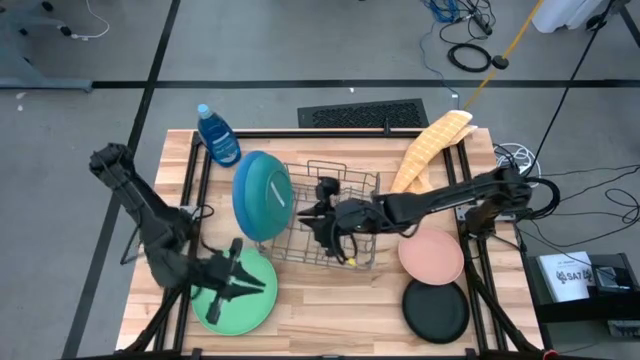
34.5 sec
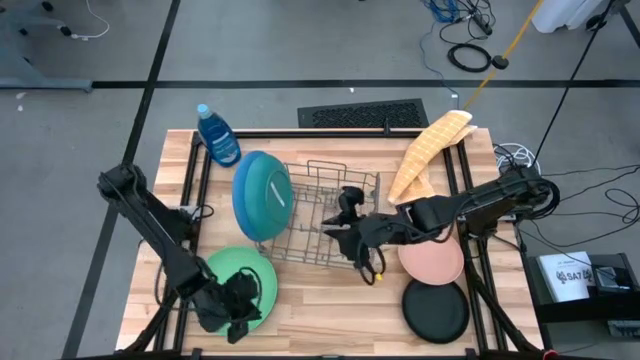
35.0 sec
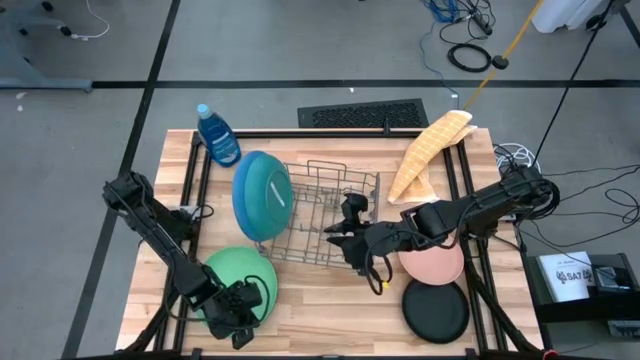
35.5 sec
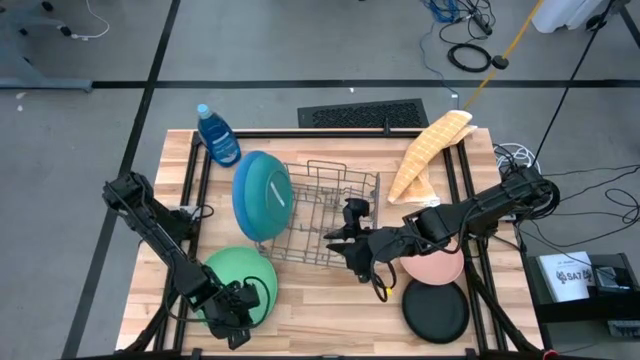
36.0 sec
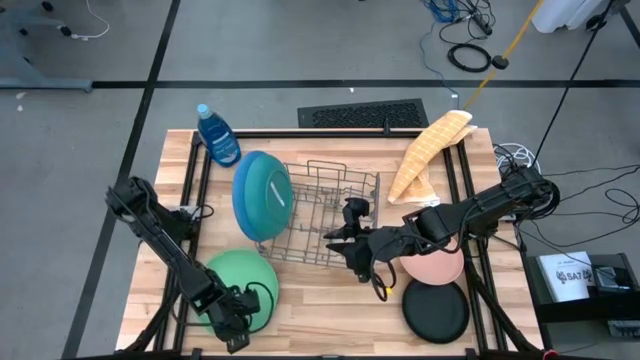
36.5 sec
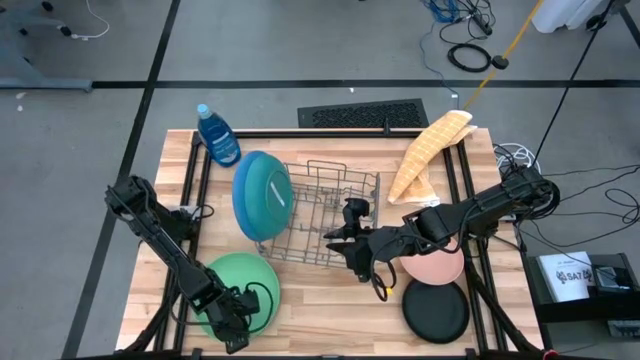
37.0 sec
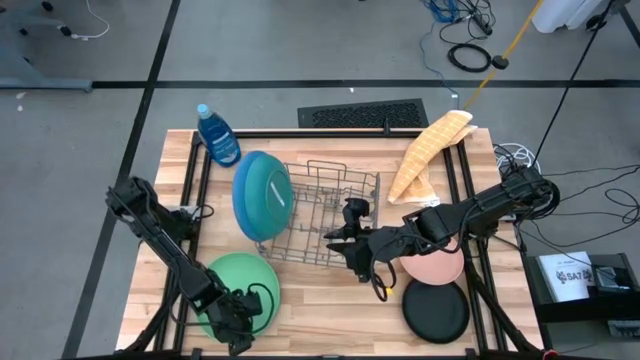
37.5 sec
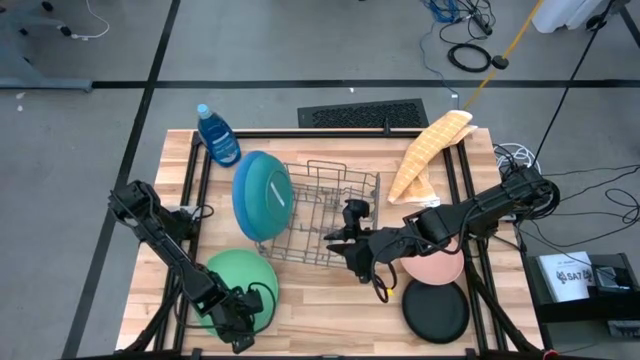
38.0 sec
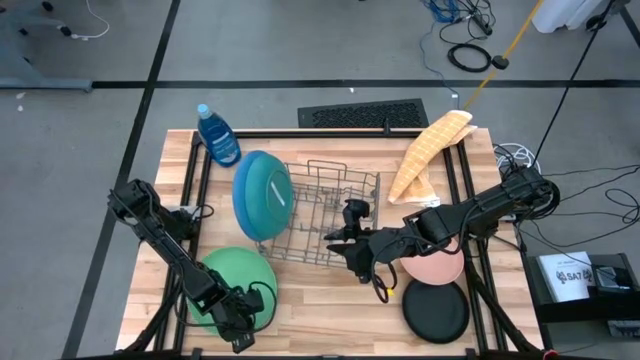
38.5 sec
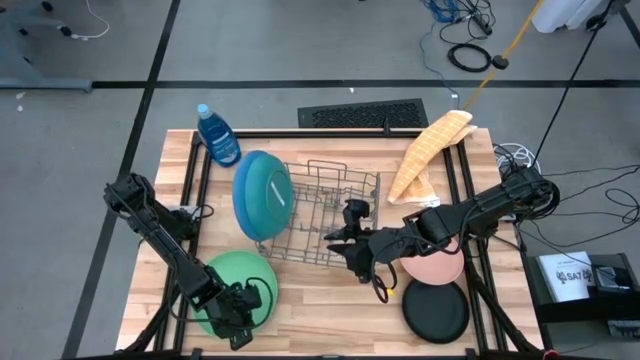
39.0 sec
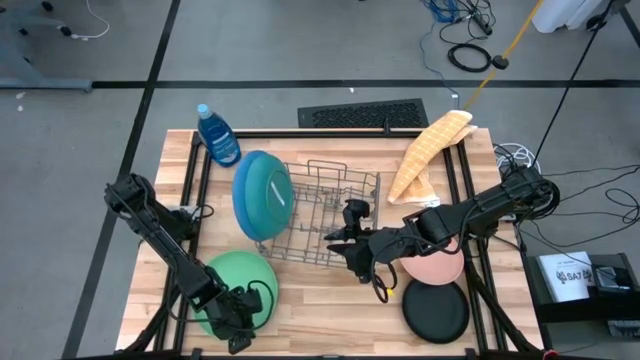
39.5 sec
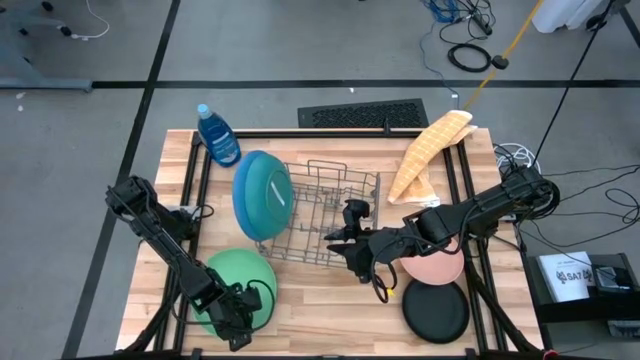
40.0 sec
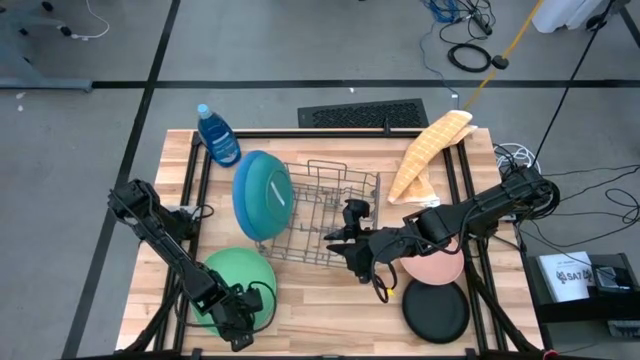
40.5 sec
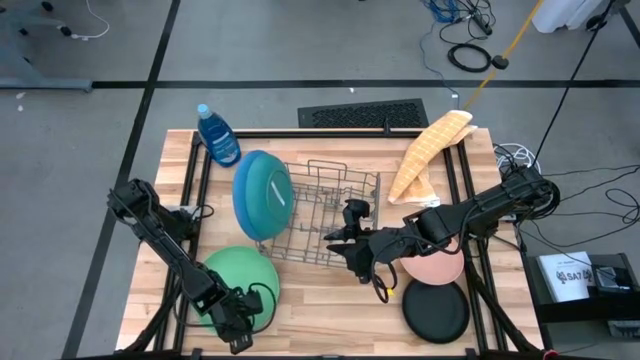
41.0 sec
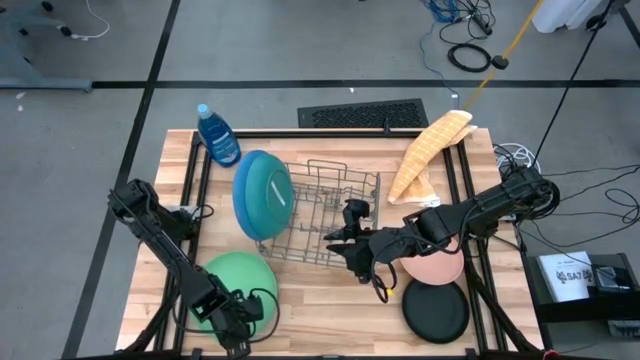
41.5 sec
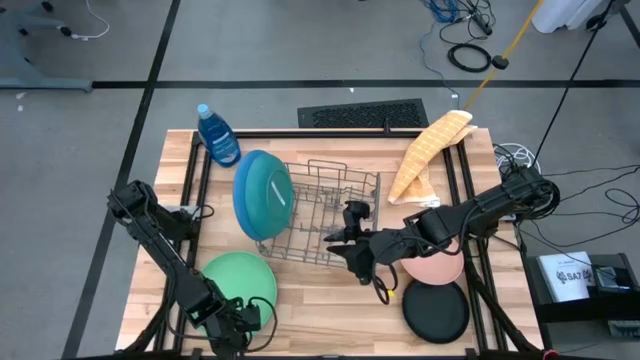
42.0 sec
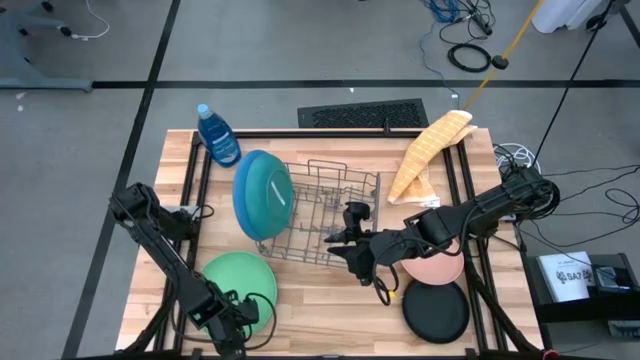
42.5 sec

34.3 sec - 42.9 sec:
Task: Sort dishes
Put the light green plate into the dish rack

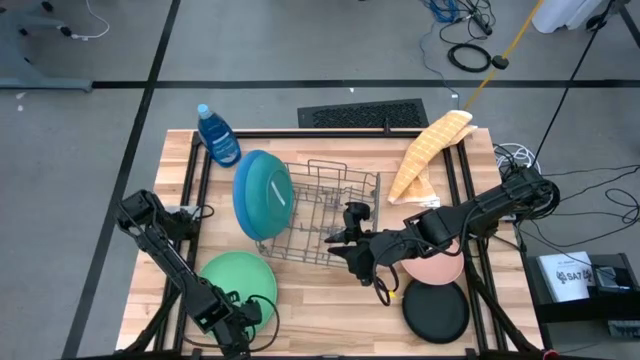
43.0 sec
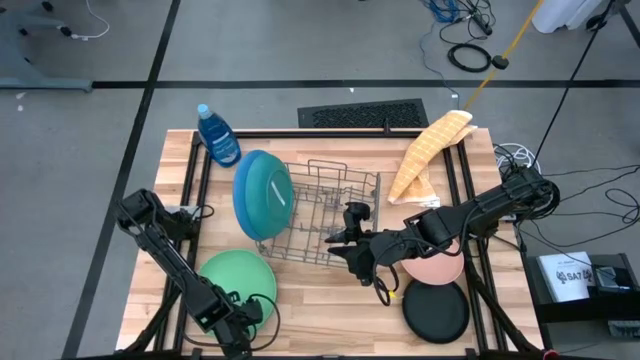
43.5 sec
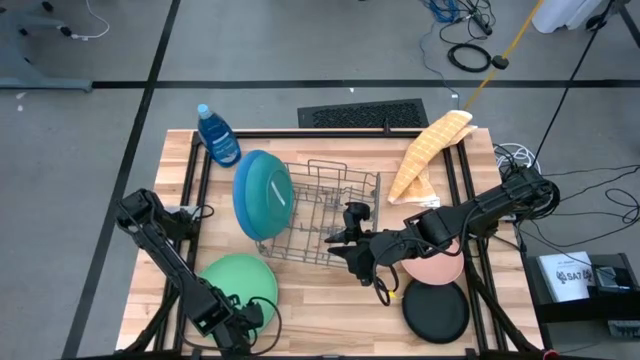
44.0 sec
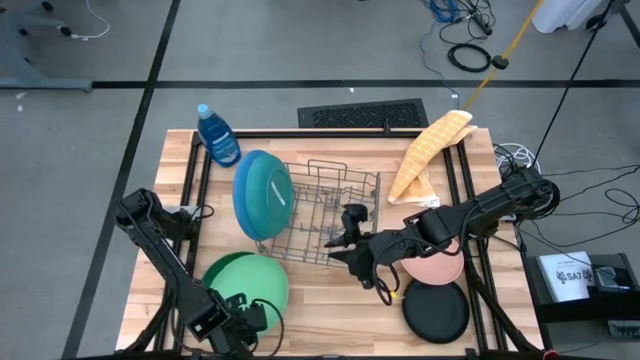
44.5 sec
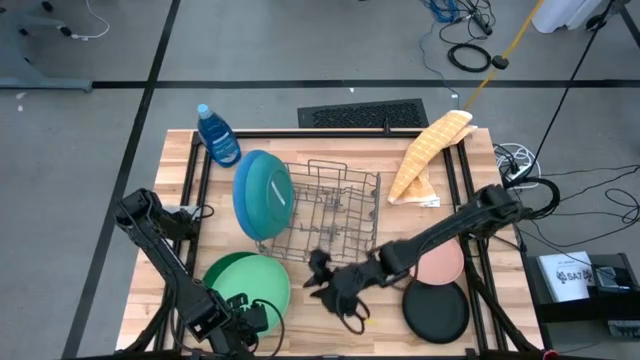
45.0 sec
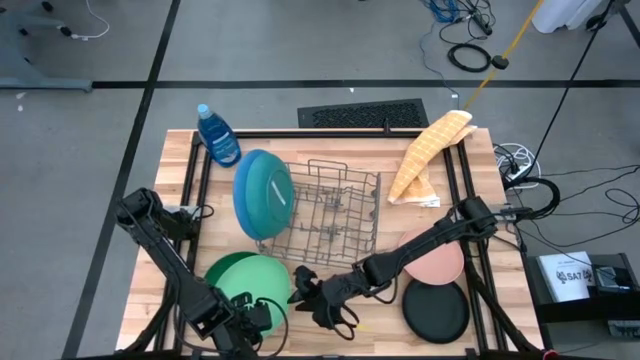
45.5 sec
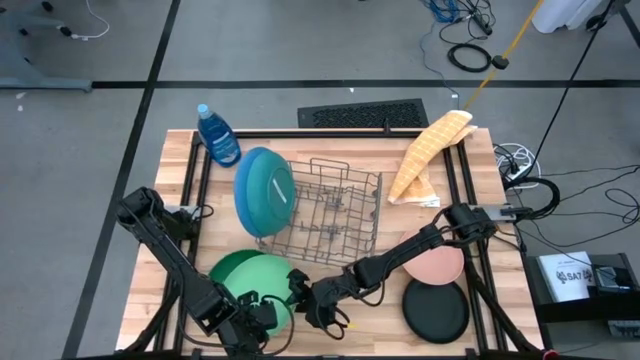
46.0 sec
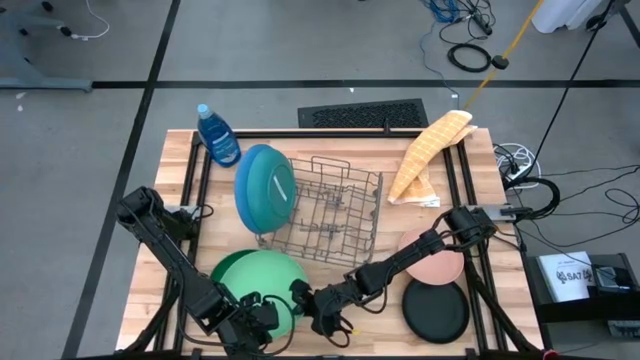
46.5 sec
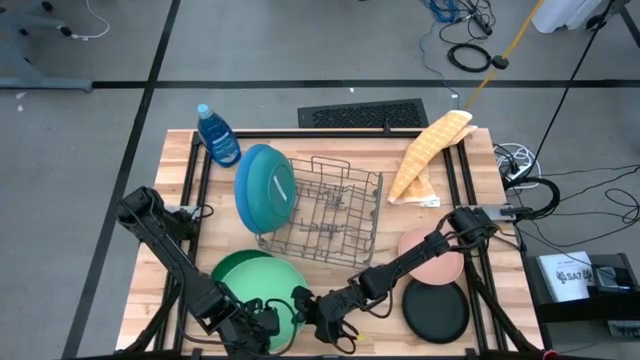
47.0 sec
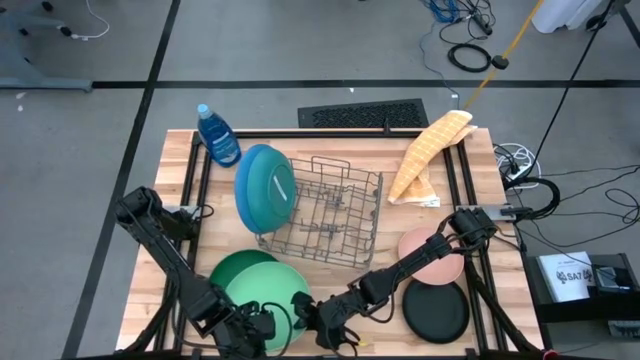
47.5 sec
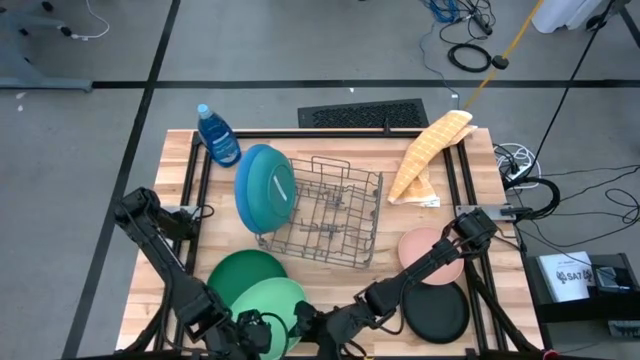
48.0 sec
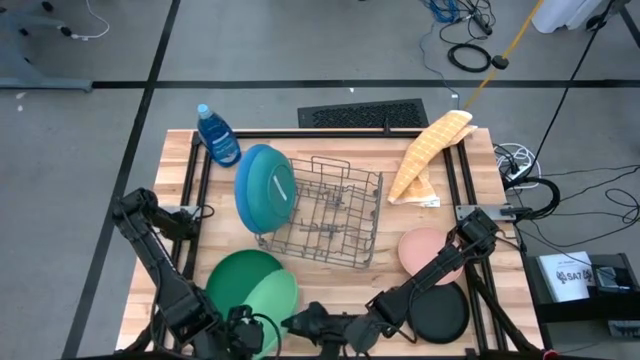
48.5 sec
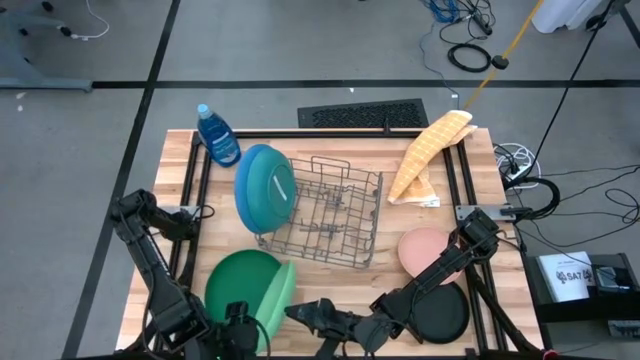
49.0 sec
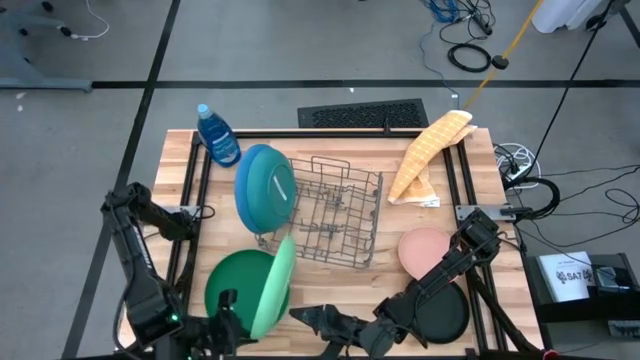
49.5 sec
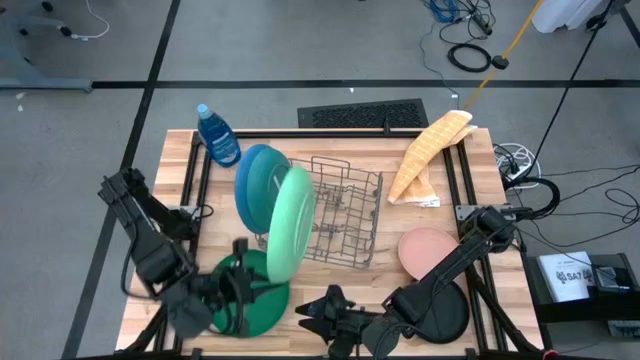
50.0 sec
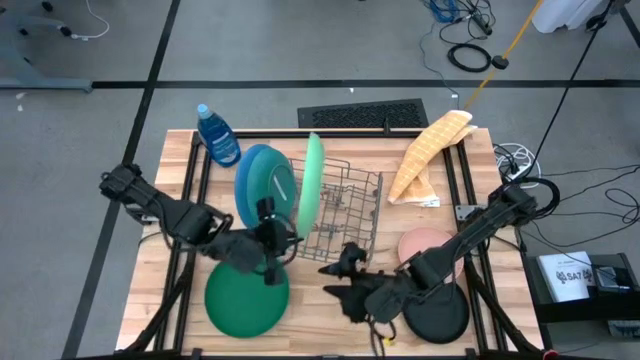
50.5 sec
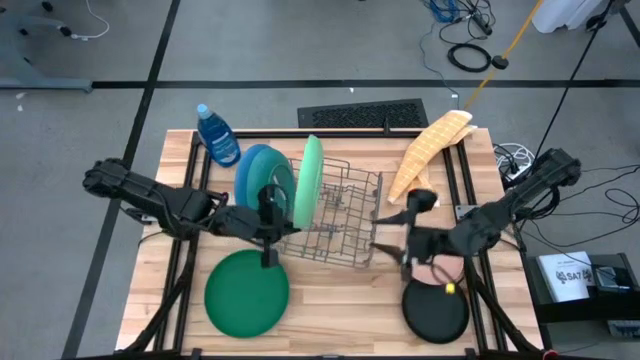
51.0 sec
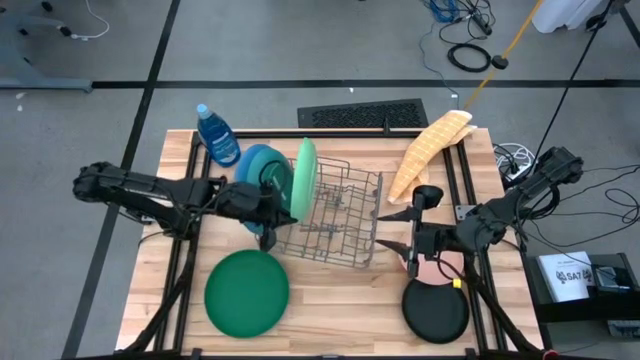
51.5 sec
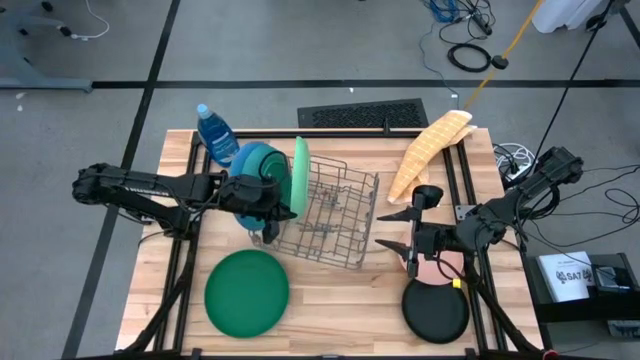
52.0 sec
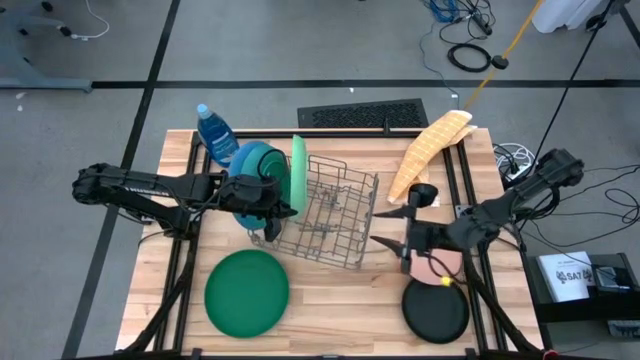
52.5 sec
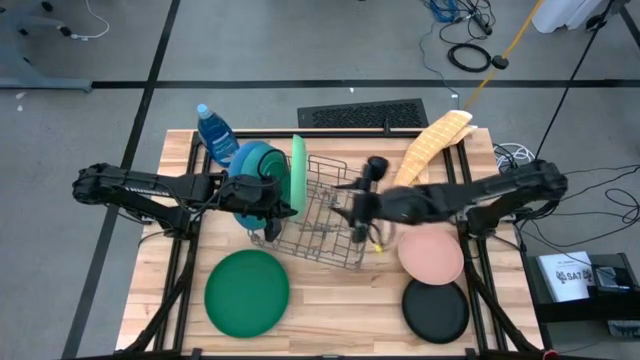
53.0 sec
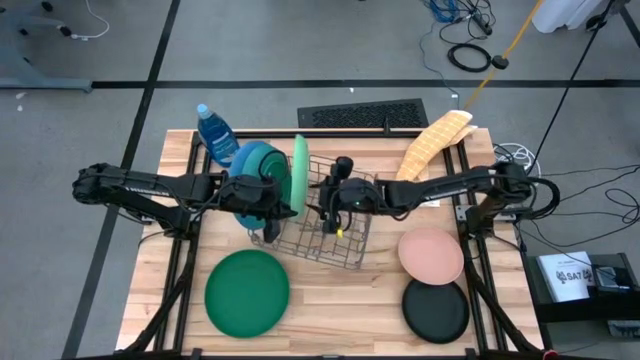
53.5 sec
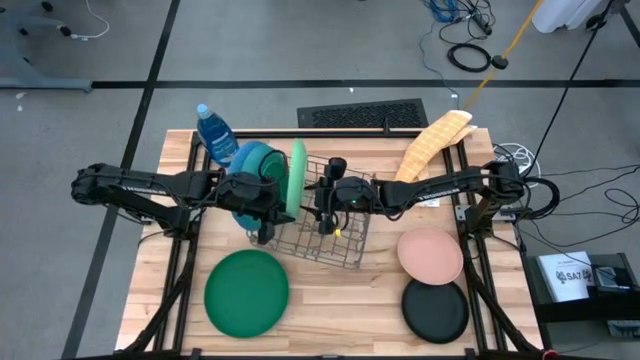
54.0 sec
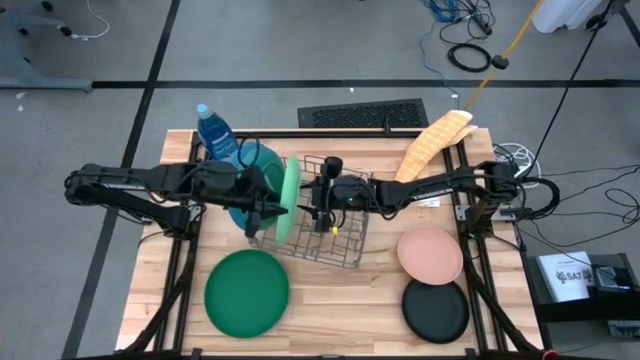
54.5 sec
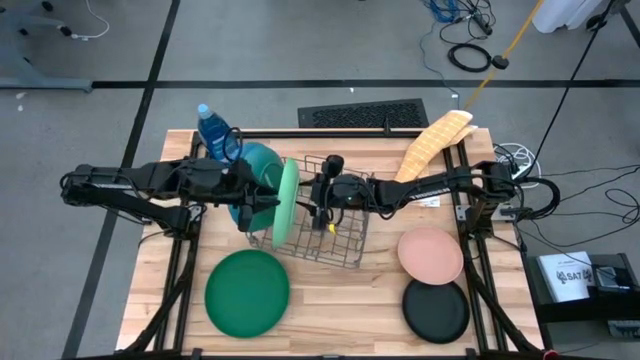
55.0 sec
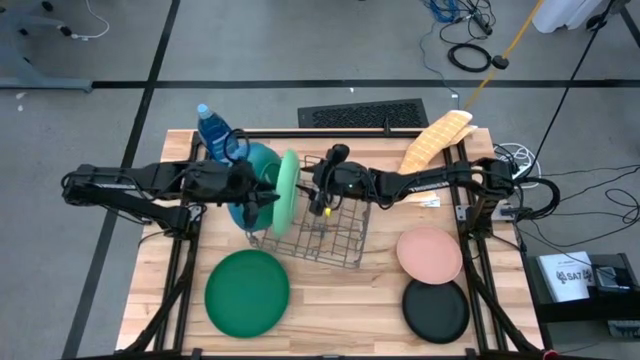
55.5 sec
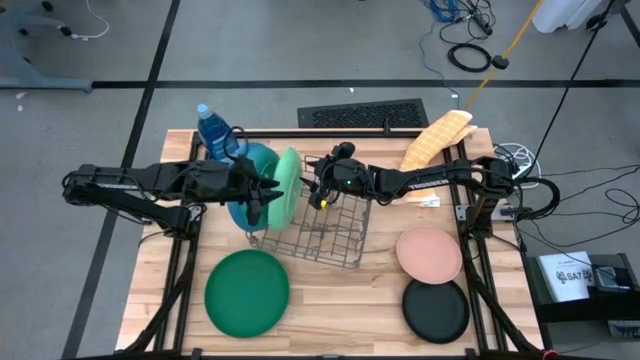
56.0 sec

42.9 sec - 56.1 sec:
Put the light green plate into the dish rack

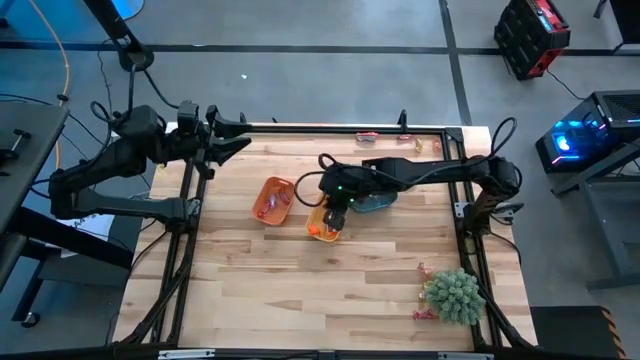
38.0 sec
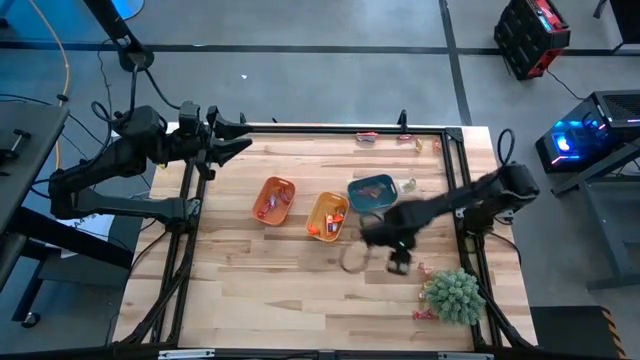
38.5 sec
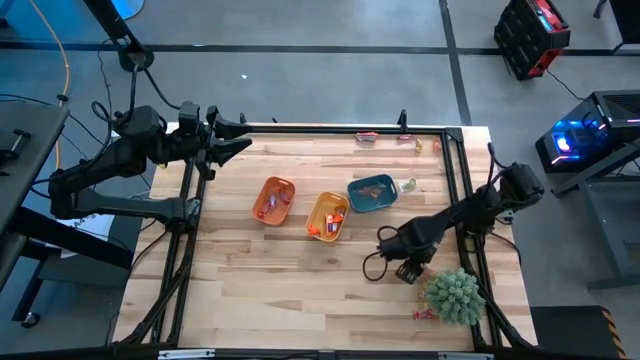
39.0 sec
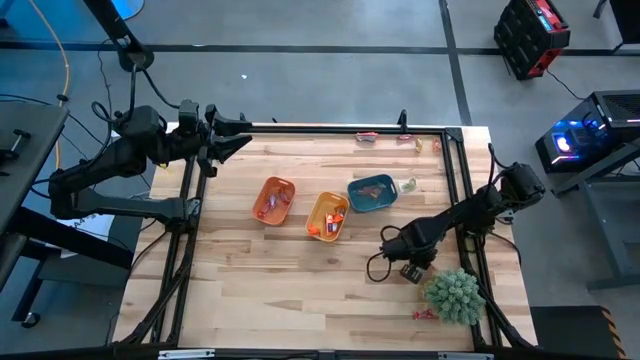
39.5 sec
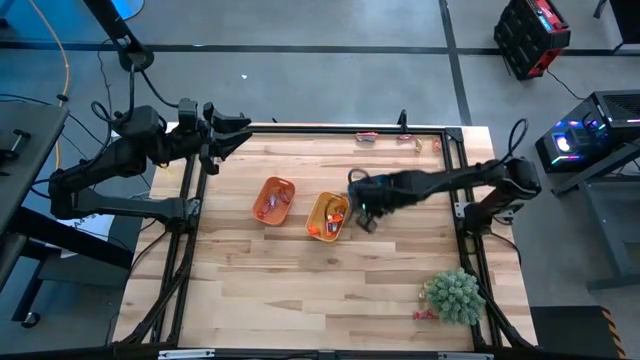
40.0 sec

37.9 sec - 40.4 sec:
Task: Sort candy
Put the orange gummy into the blue bin
